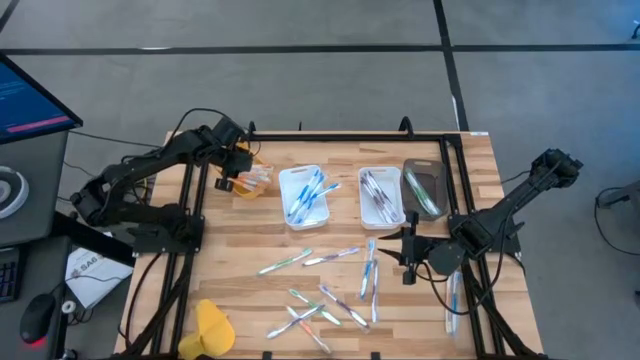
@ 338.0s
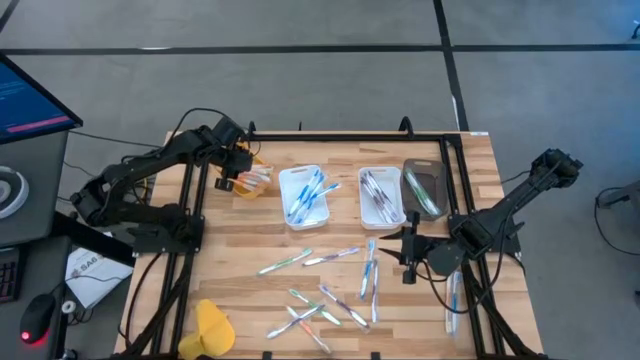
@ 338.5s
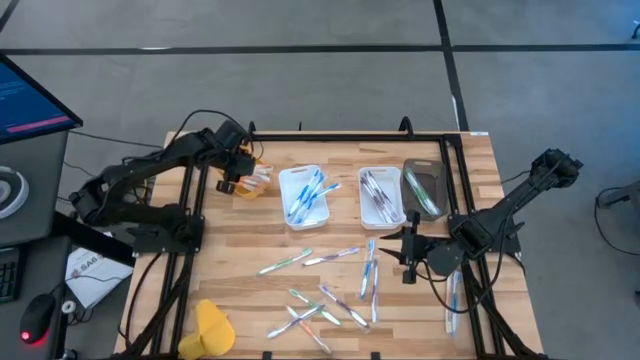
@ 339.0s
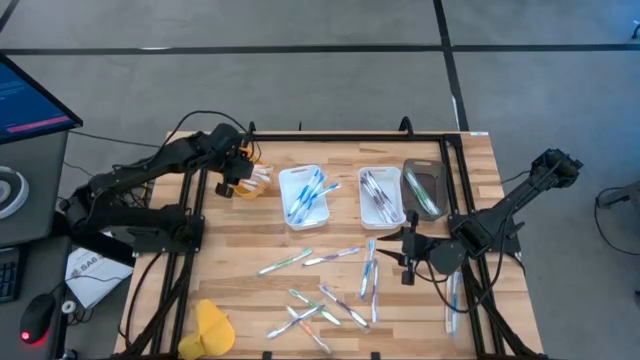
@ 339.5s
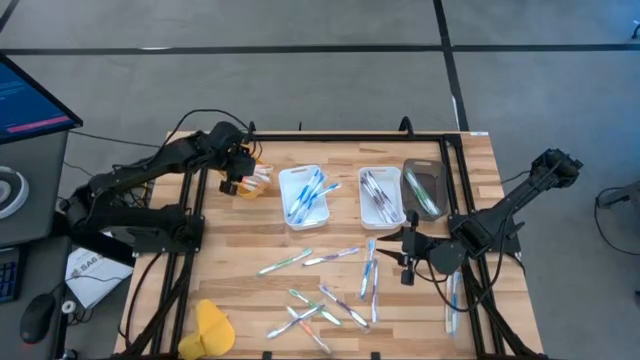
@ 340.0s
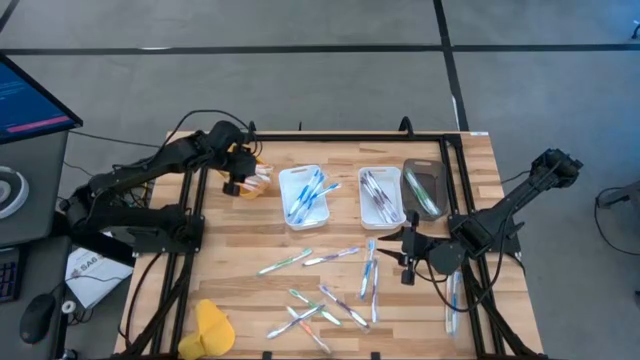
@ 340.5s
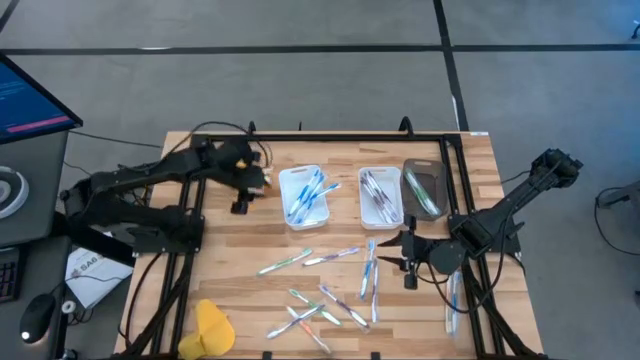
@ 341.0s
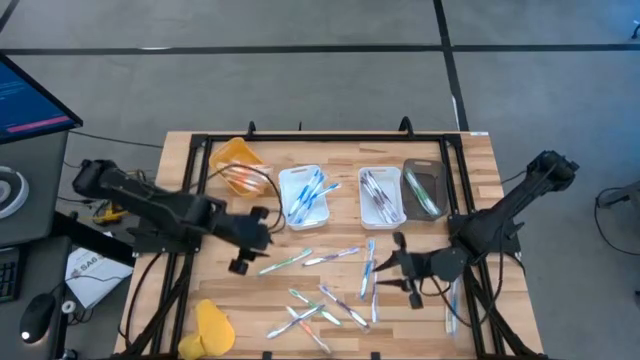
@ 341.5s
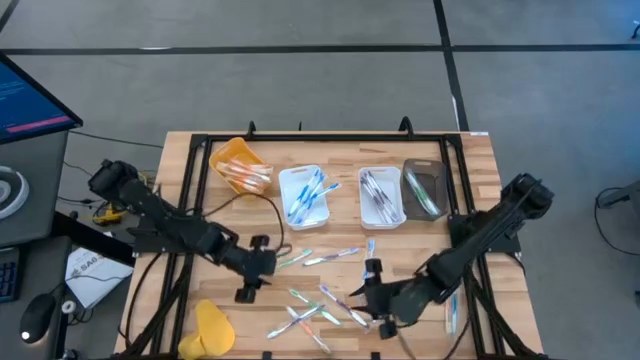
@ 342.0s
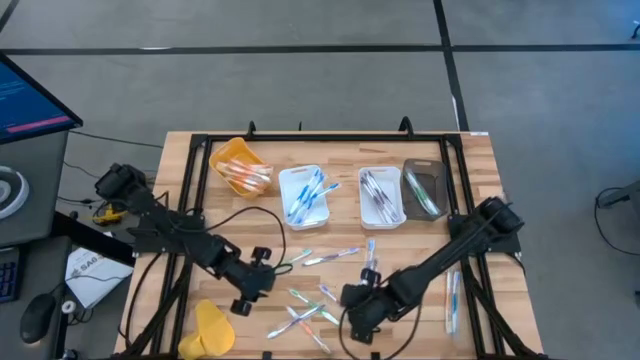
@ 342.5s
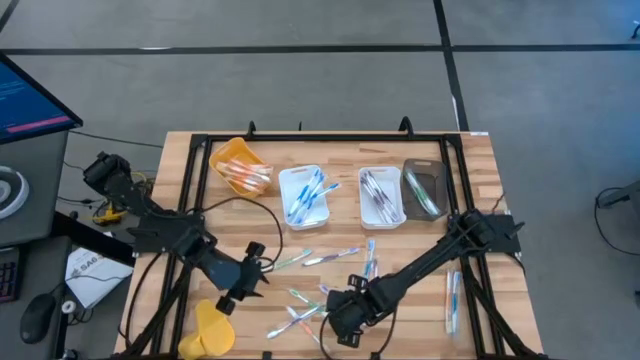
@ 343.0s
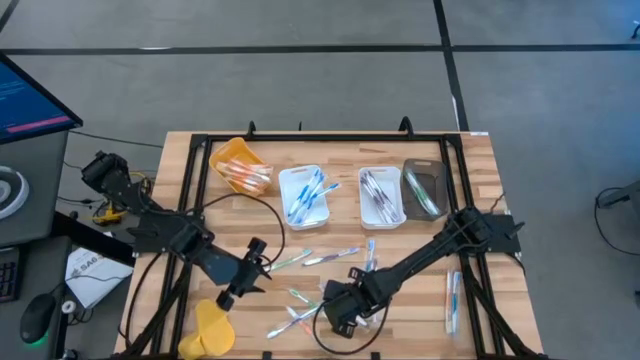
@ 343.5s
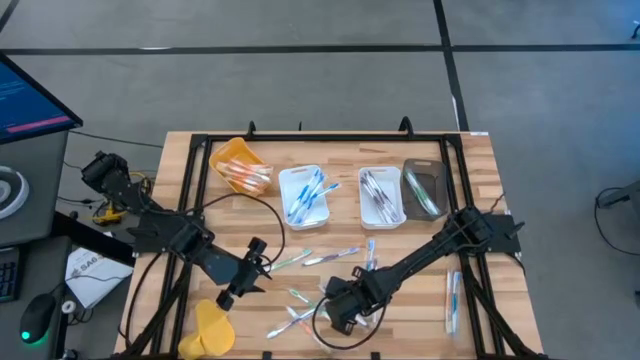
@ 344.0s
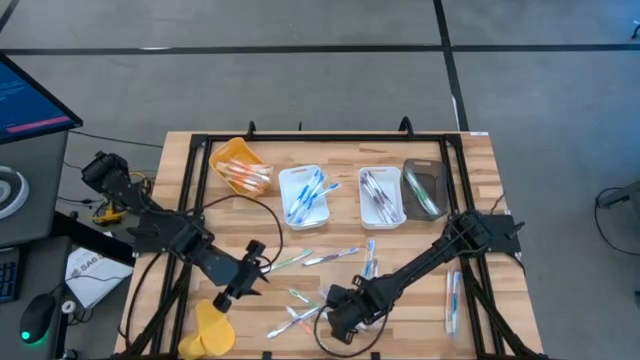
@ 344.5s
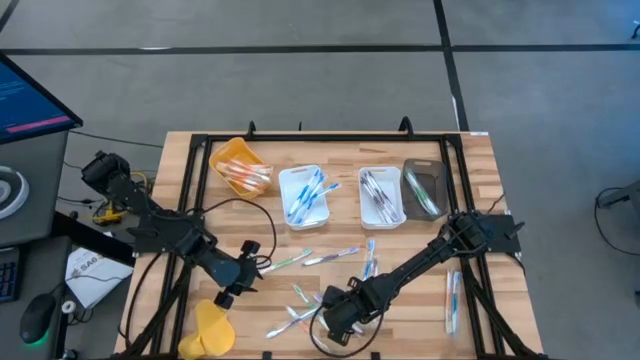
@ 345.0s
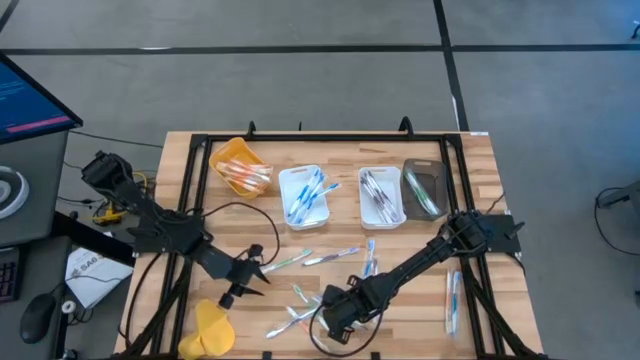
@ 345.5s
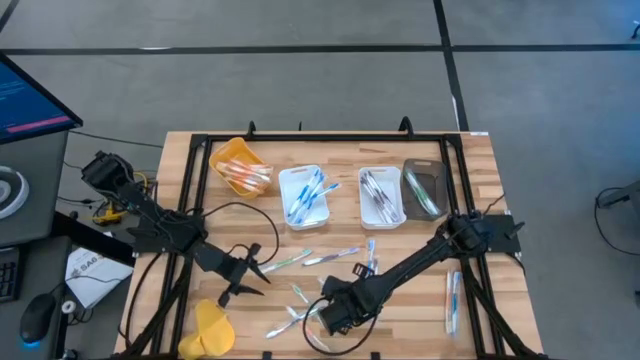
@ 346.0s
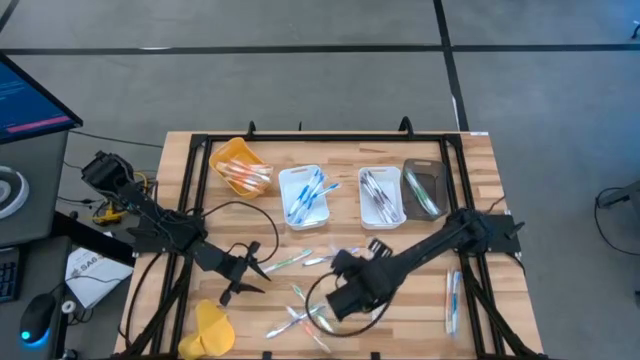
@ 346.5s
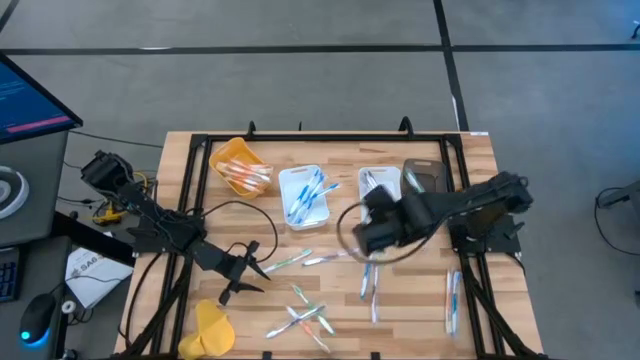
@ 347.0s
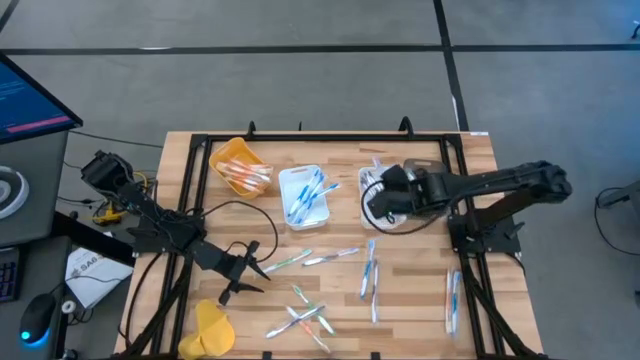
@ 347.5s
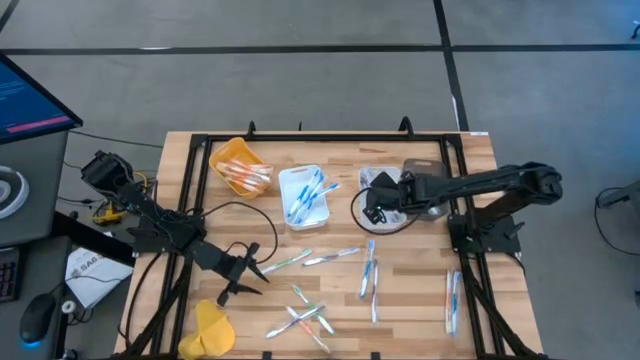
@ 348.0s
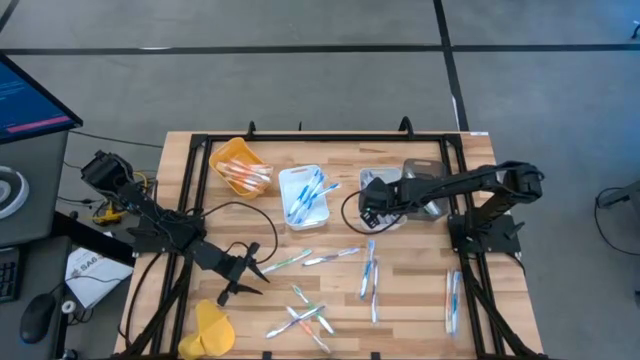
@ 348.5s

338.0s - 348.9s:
Task: Pick & Place Toothbrushes
Put the purple toothbrush into the right white bin

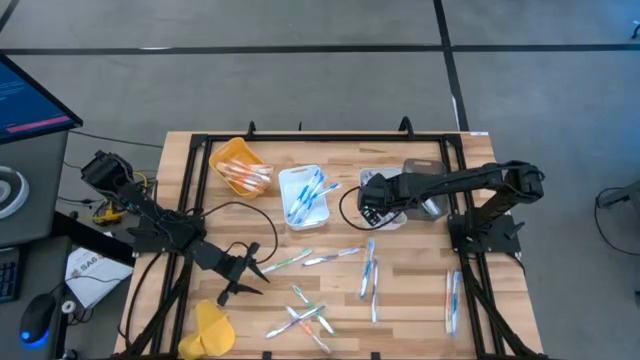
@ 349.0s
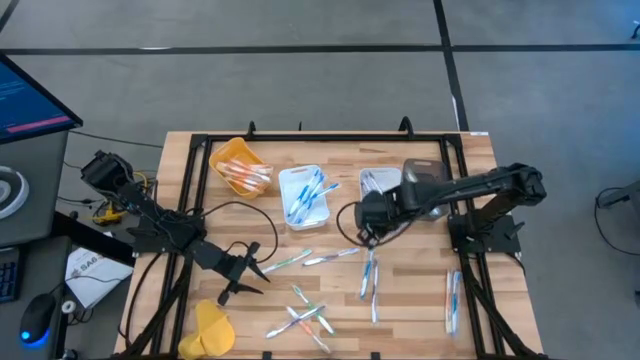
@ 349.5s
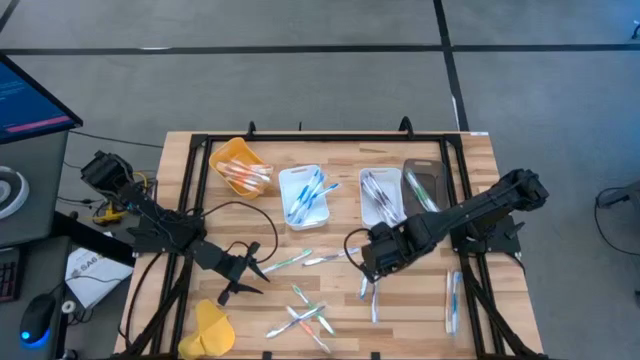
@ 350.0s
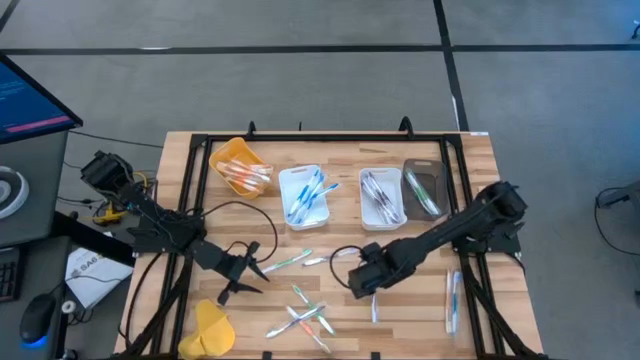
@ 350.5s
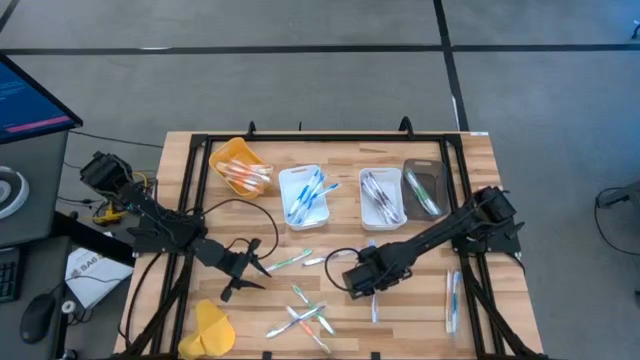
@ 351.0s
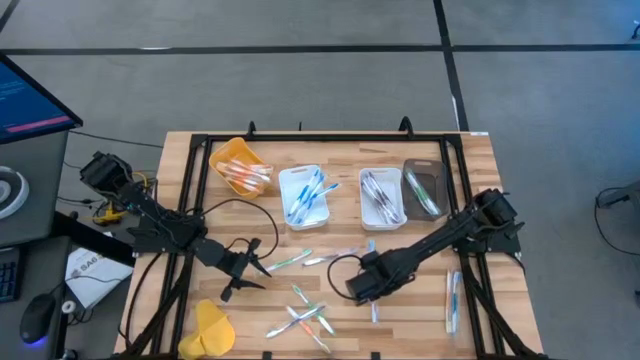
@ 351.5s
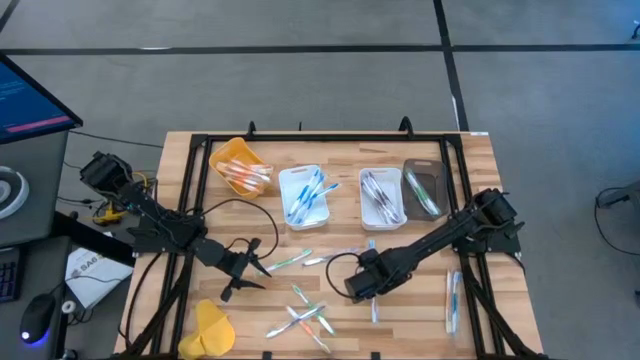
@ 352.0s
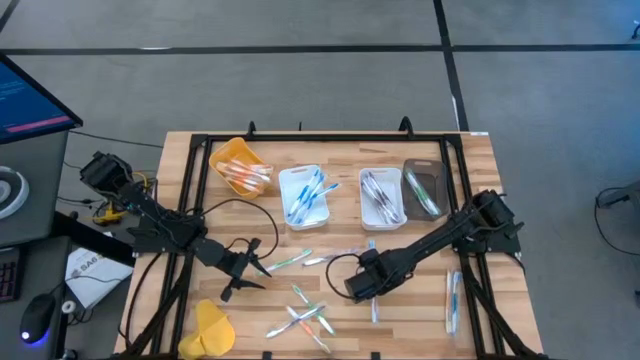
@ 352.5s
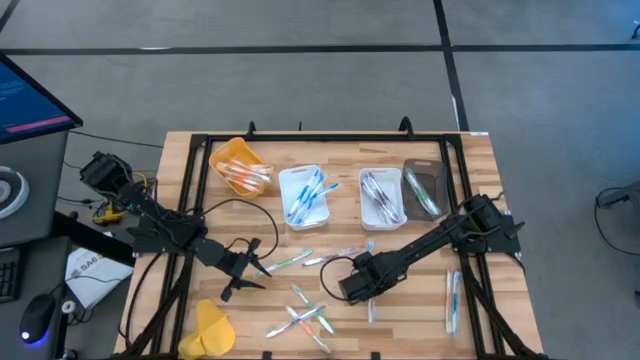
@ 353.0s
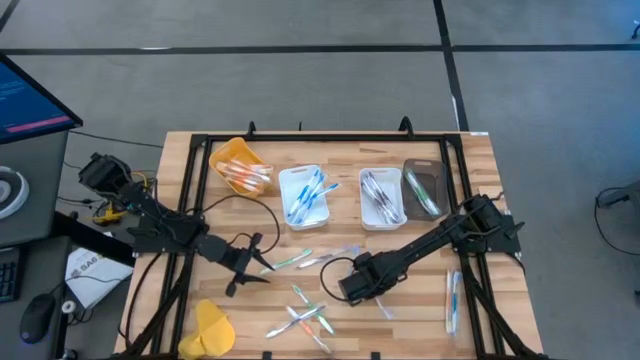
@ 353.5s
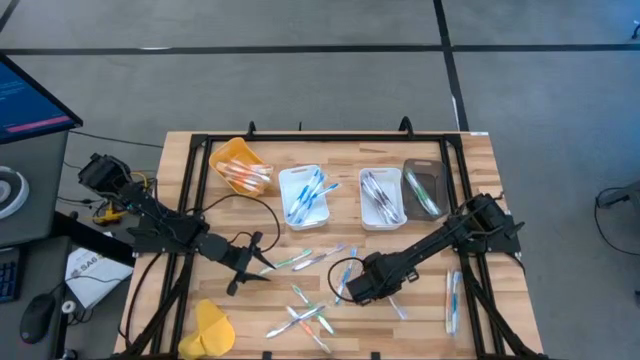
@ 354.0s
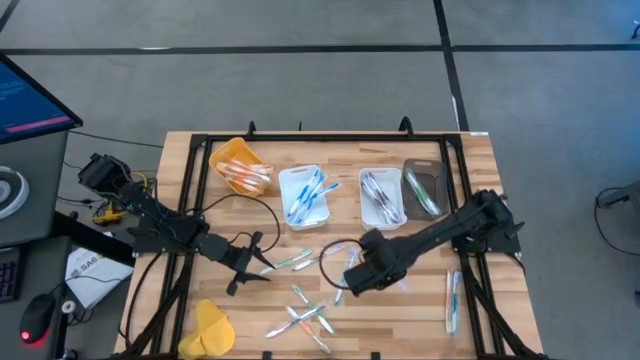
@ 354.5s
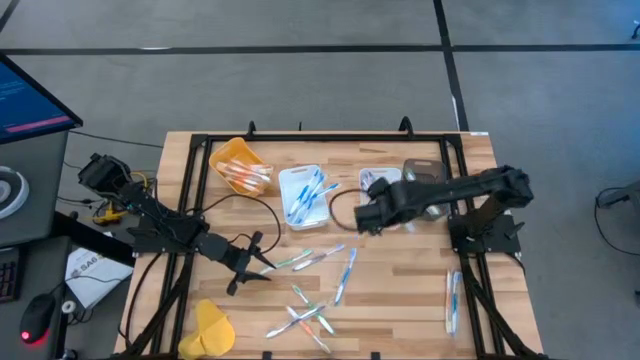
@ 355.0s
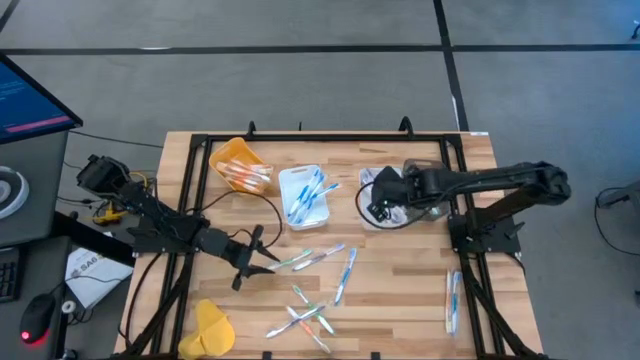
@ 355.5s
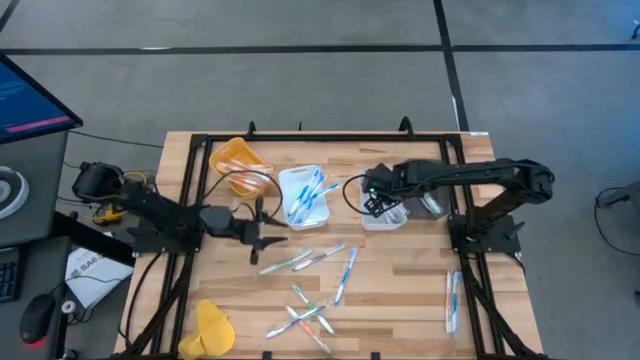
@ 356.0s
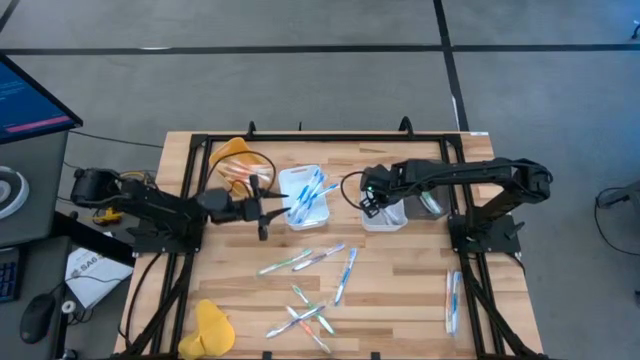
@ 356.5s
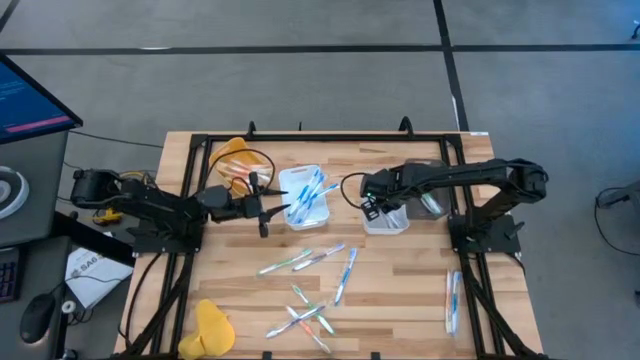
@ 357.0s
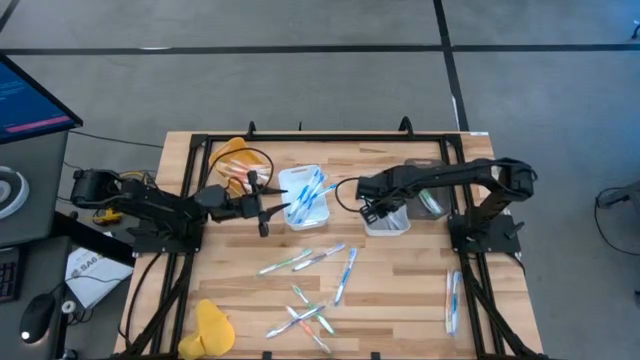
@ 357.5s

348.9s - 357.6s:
Put the middle purple toothbrush into the right white bin

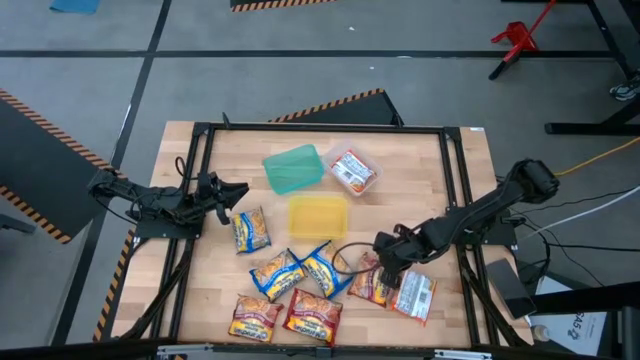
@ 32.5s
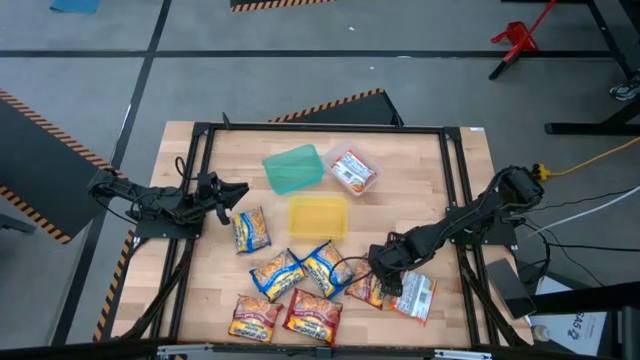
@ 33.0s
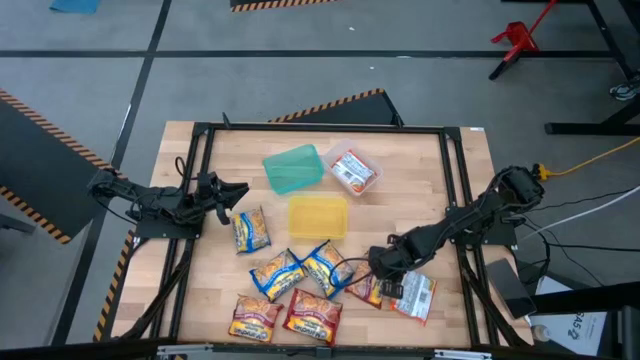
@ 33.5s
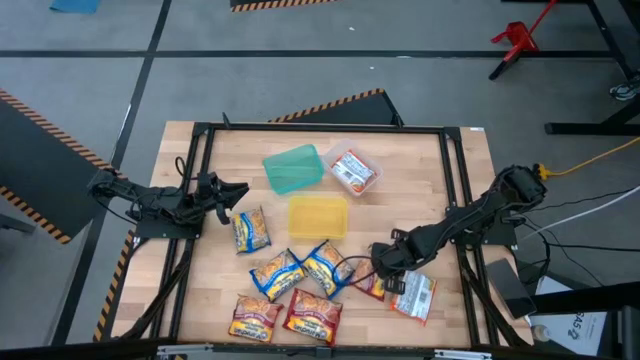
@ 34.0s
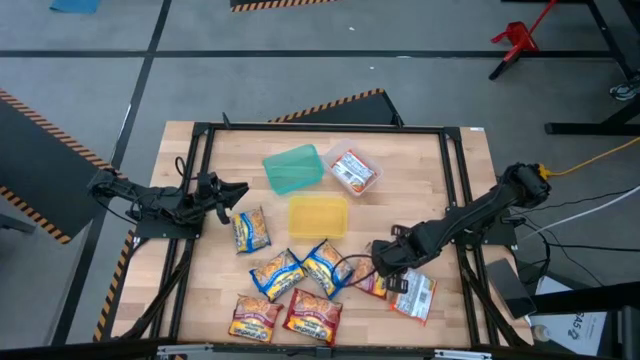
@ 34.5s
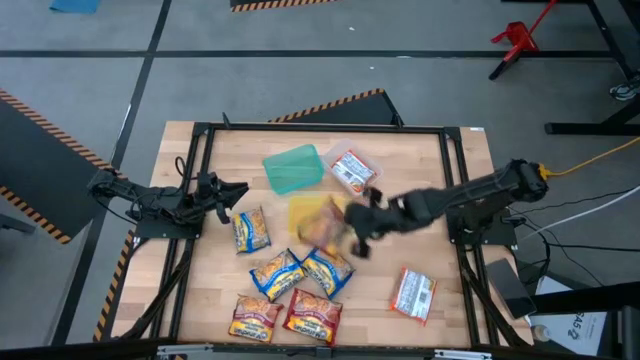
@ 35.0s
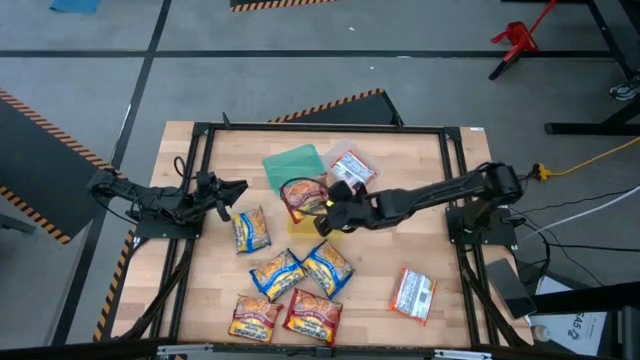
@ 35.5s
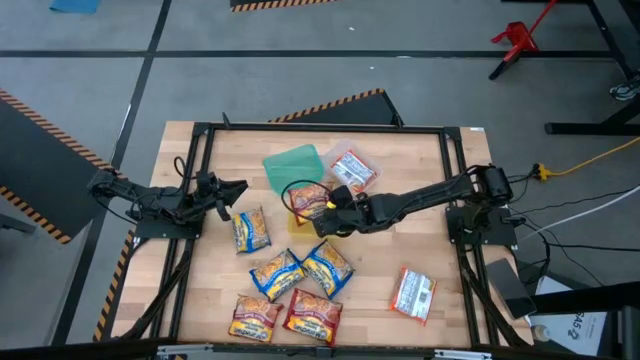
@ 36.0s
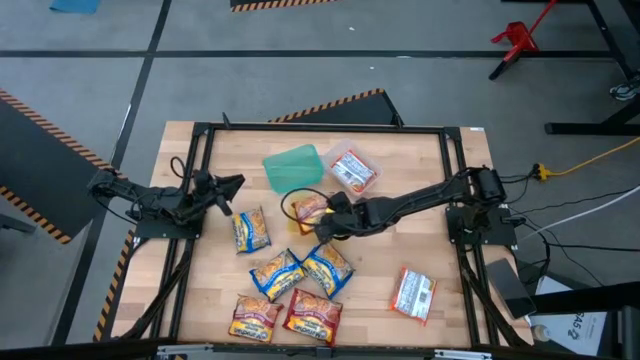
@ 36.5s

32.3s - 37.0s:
Task: Sort Maruchan noodles
Put the right red noodle pack into the yellow bin
